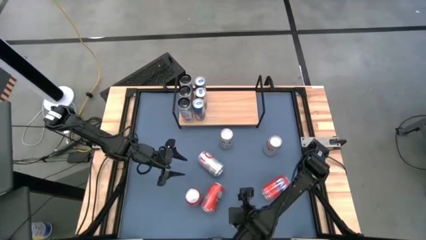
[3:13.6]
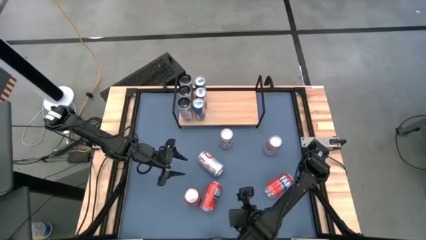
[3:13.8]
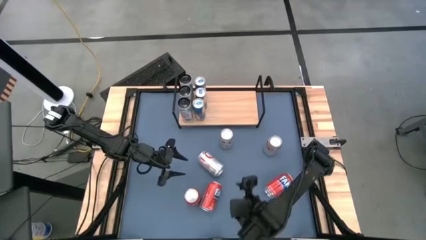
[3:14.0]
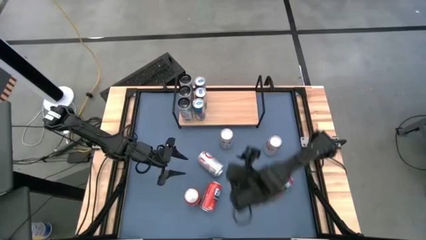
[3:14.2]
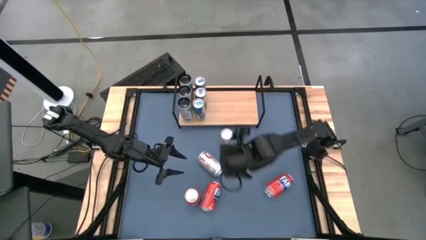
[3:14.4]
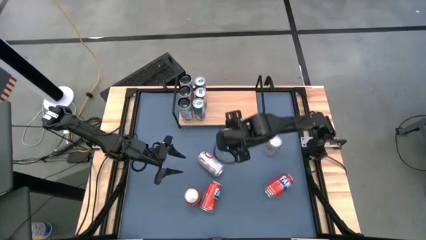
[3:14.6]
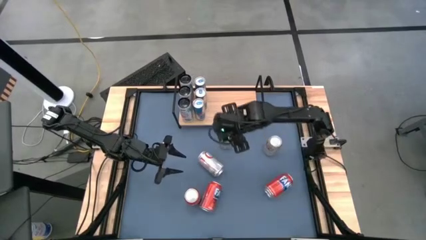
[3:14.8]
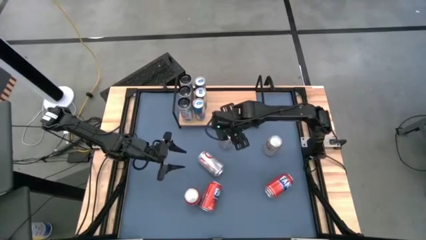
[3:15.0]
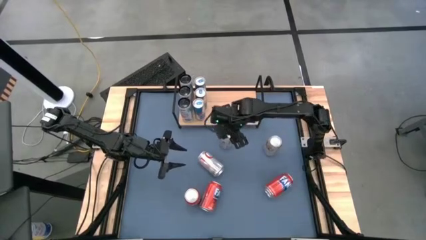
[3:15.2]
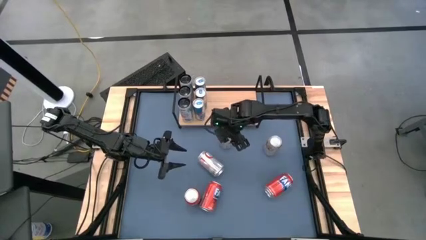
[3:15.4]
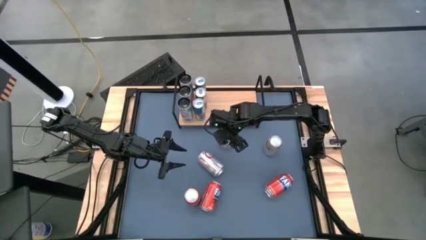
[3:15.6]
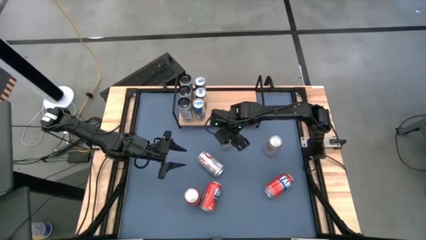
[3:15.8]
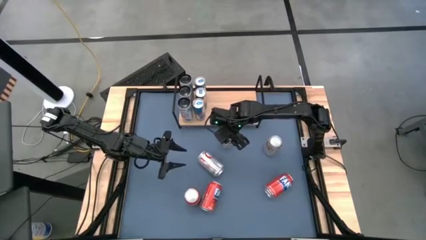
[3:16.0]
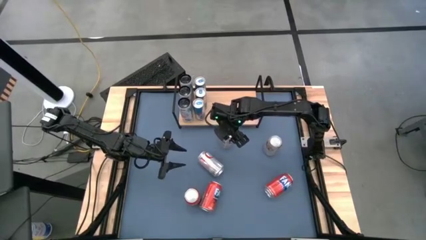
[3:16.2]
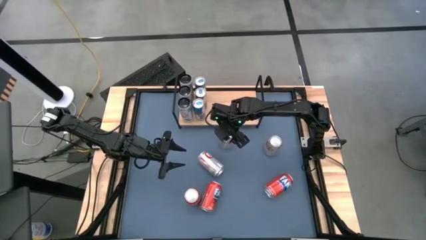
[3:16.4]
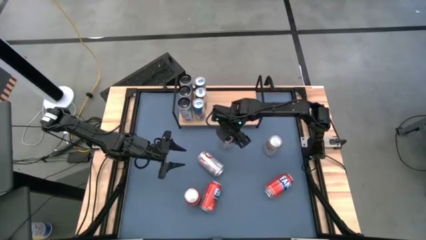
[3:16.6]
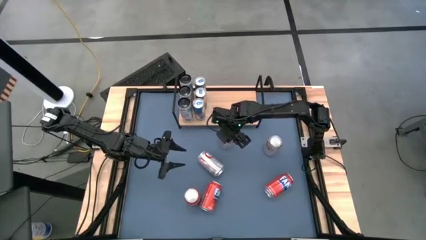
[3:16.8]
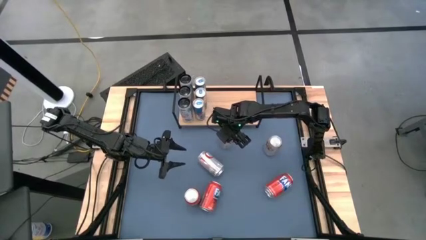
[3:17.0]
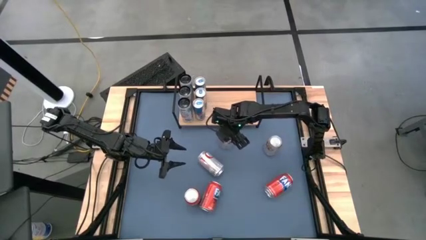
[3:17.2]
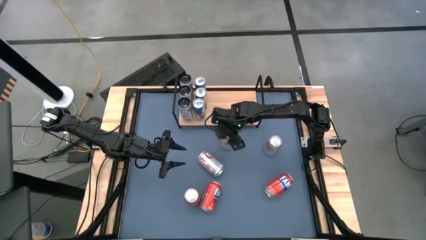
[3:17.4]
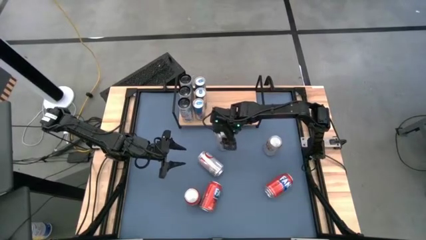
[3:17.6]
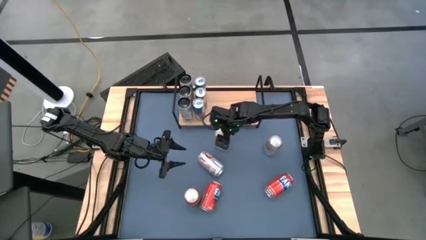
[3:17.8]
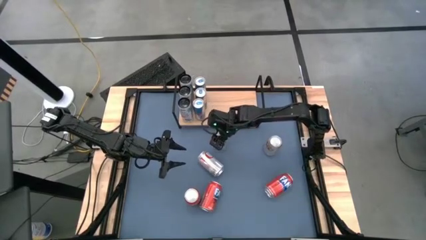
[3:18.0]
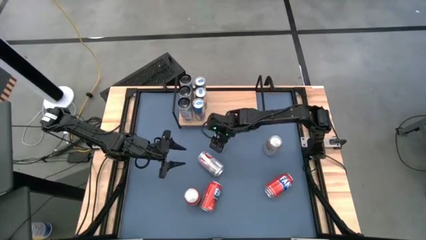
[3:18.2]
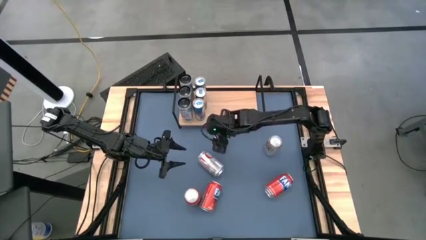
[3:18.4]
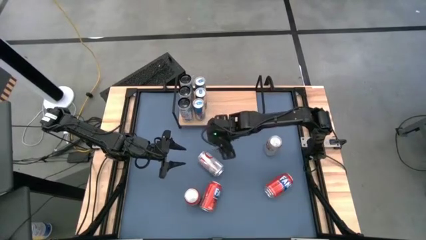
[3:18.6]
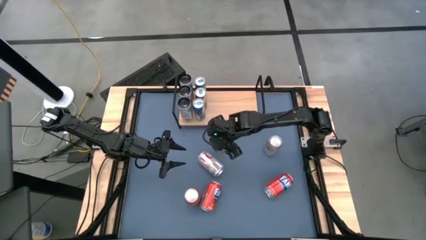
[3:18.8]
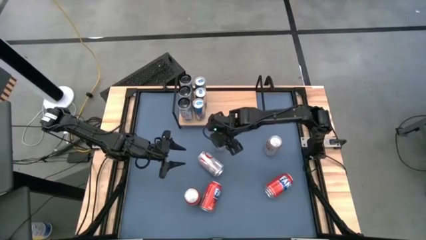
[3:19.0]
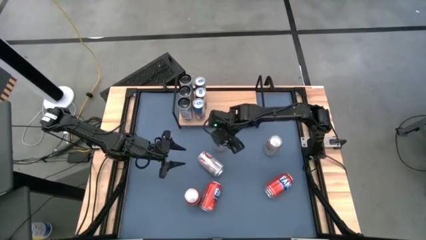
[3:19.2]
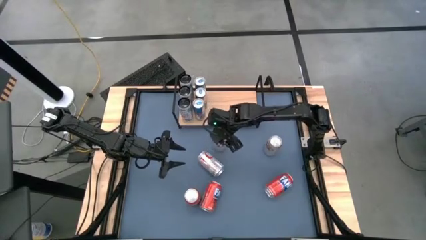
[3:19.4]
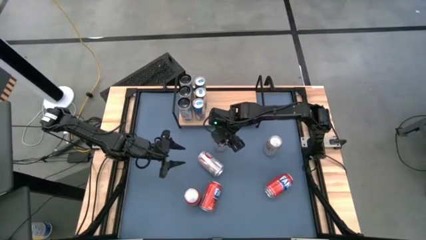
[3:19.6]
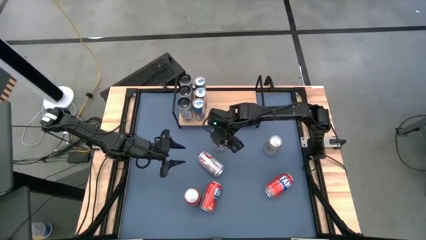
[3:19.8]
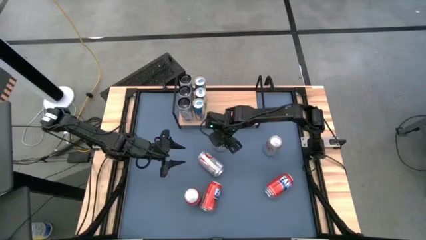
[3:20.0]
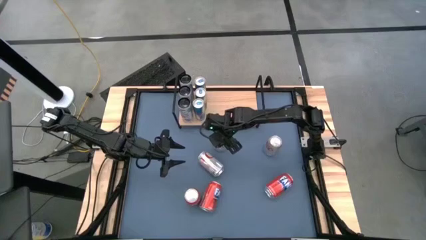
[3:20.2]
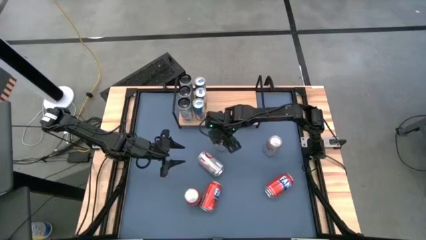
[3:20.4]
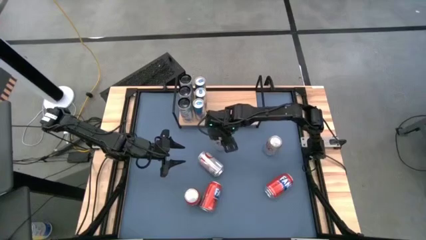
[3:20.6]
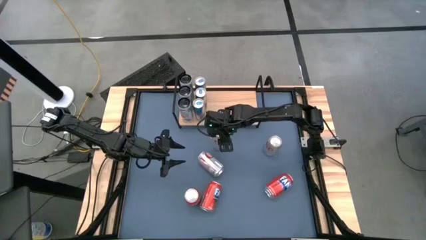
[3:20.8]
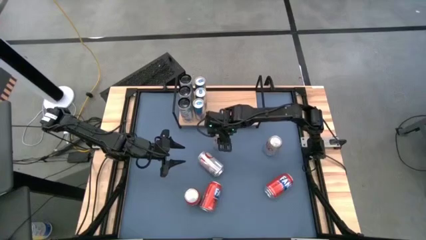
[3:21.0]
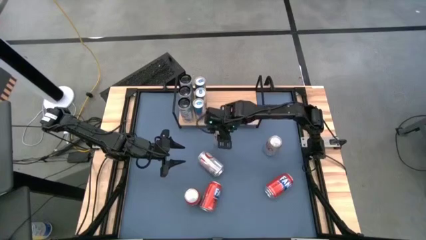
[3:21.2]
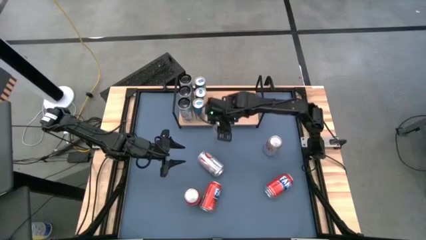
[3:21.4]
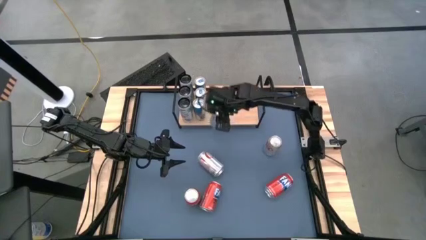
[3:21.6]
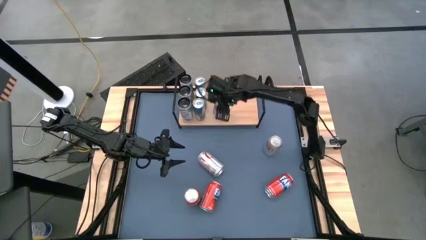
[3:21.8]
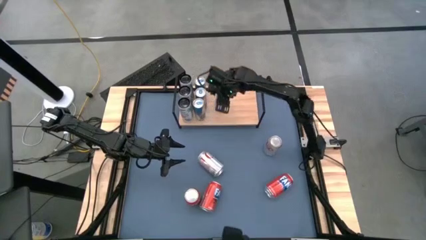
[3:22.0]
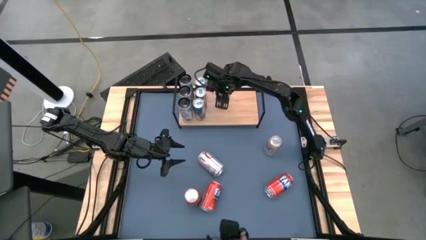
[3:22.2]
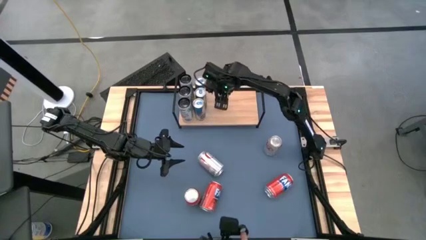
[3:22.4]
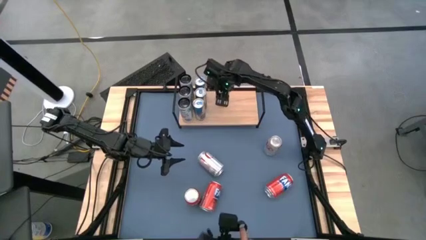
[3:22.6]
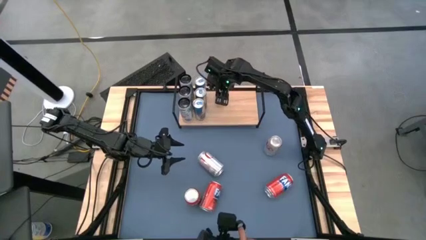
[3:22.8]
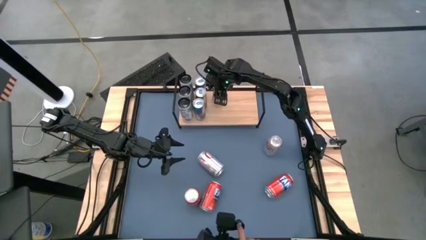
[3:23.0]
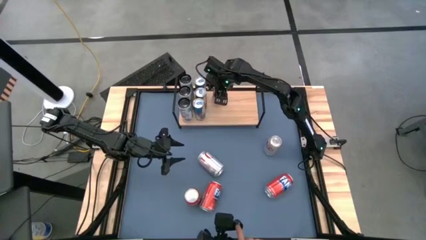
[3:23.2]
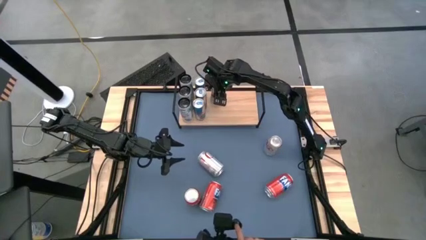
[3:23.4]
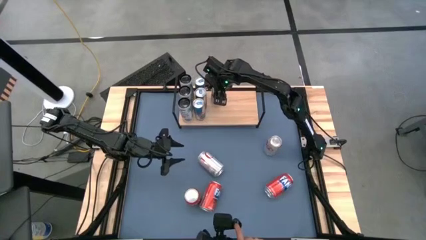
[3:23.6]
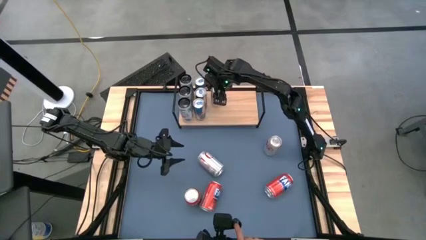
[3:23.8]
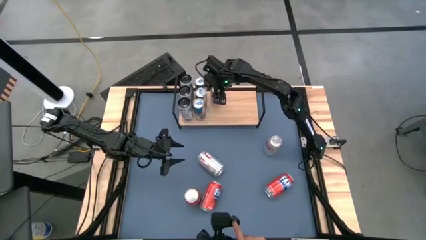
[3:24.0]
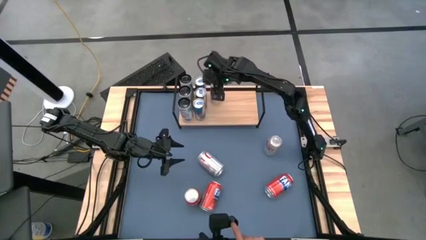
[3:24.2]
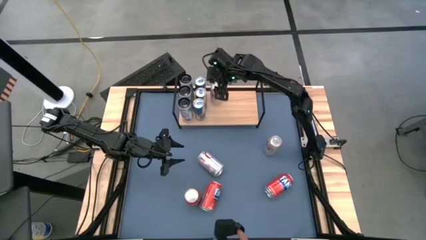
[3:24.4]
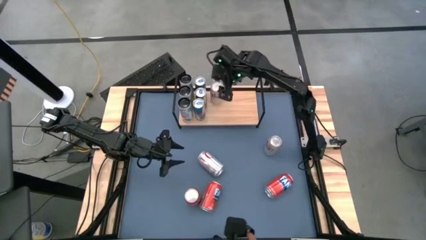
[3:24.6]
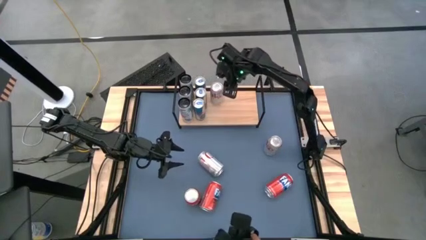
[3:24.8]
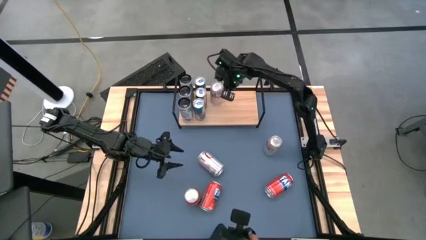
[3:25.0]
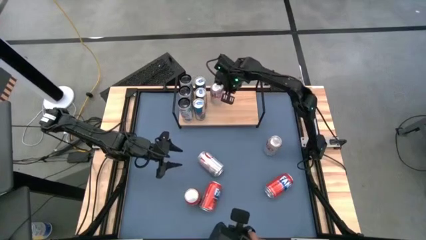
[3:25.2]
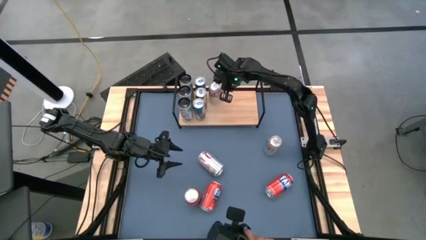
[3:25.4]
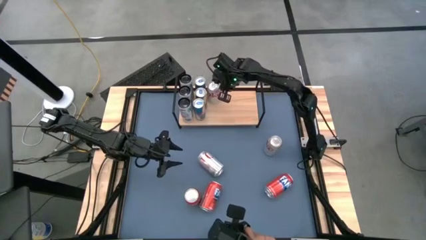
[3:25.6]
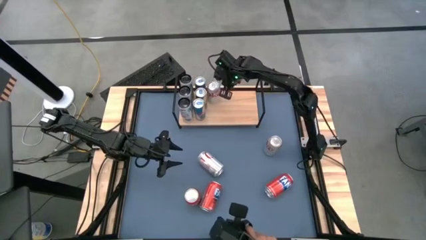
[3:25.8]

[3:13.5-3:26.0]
Task: Place canned beverage on shelf
Put the middle silver soda can on the shelf

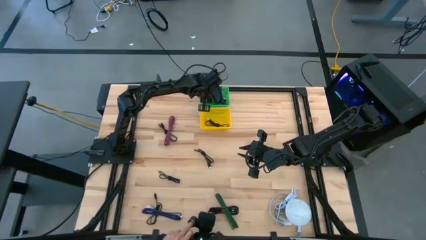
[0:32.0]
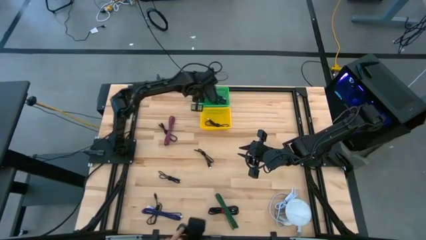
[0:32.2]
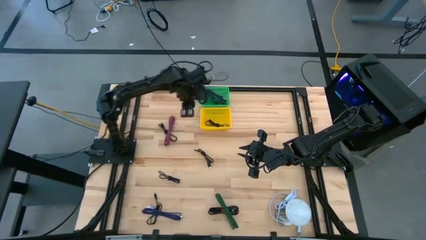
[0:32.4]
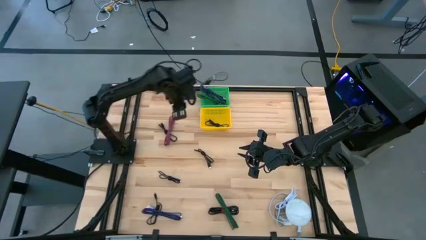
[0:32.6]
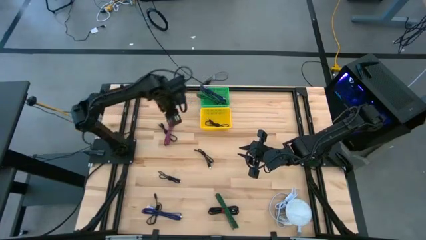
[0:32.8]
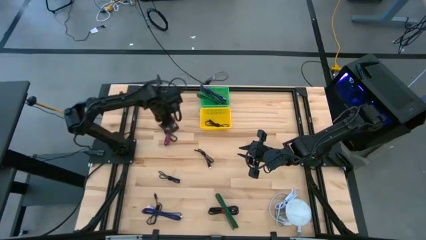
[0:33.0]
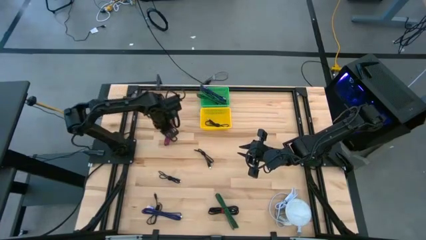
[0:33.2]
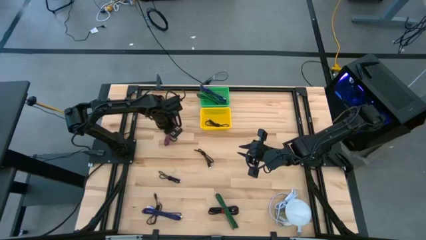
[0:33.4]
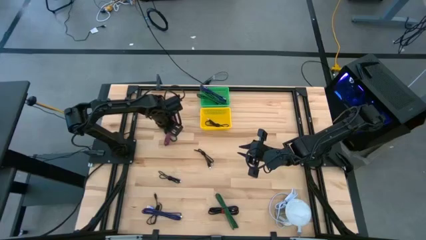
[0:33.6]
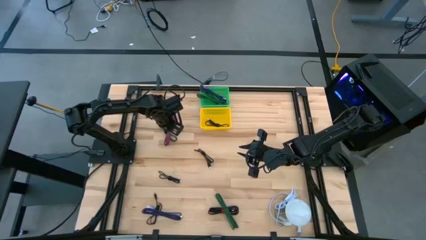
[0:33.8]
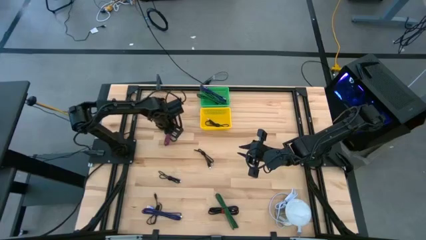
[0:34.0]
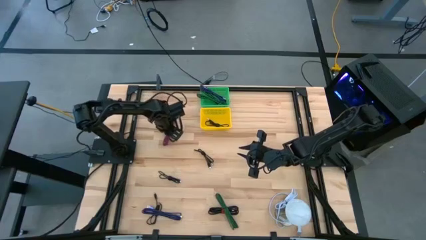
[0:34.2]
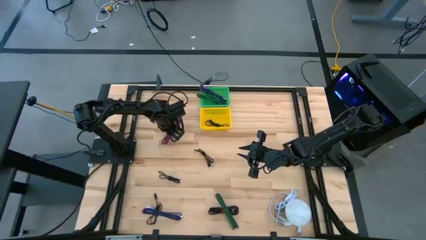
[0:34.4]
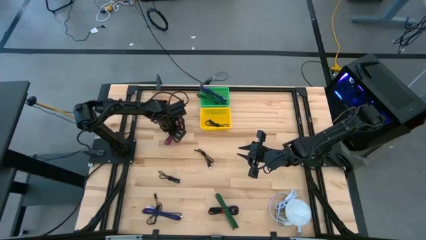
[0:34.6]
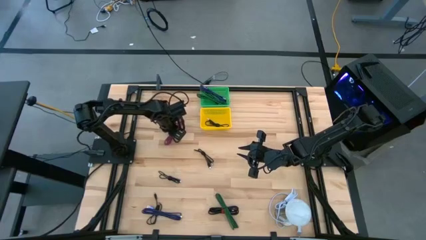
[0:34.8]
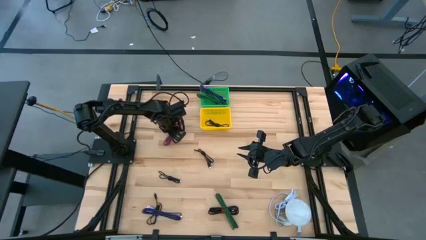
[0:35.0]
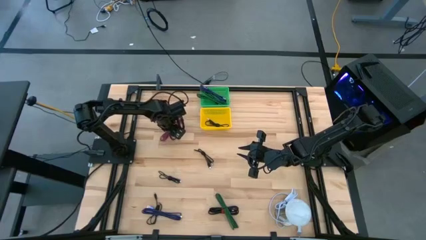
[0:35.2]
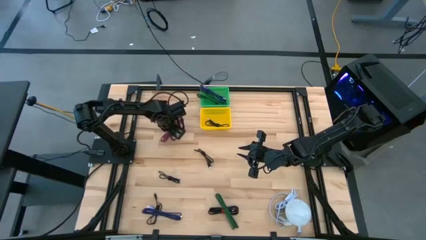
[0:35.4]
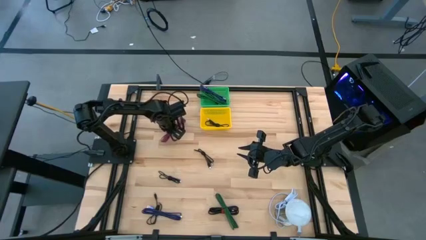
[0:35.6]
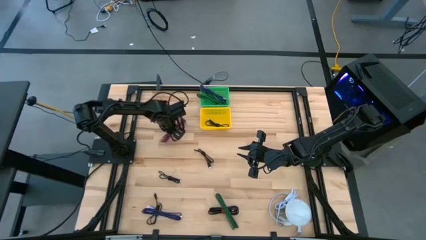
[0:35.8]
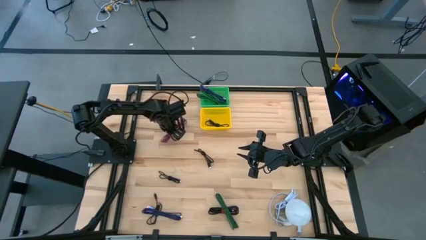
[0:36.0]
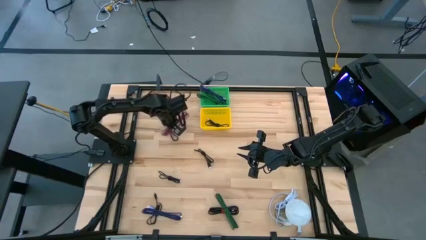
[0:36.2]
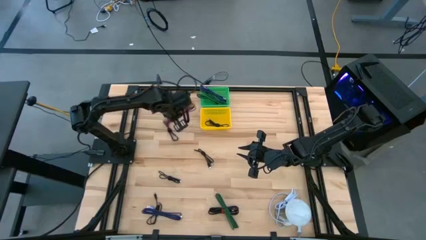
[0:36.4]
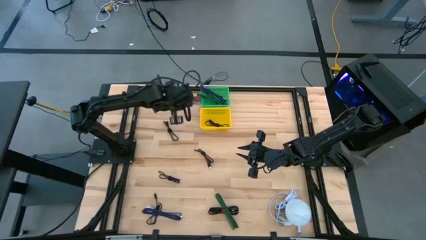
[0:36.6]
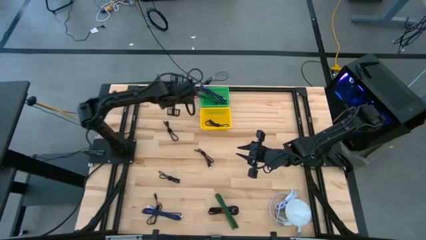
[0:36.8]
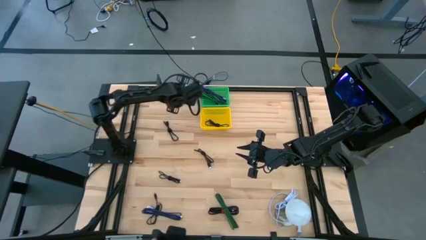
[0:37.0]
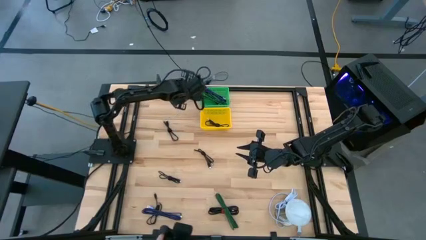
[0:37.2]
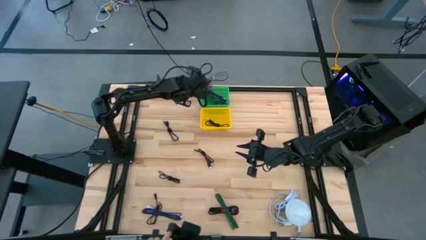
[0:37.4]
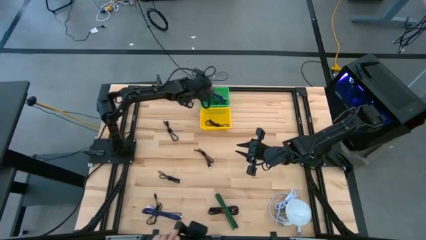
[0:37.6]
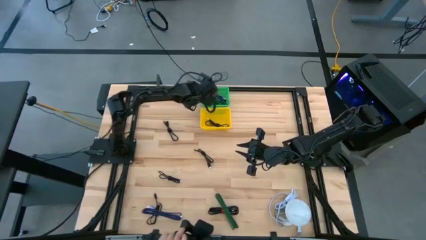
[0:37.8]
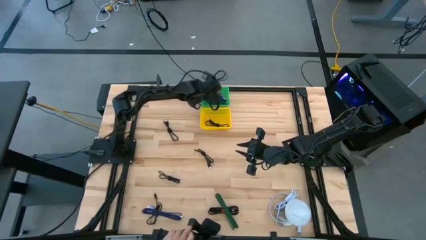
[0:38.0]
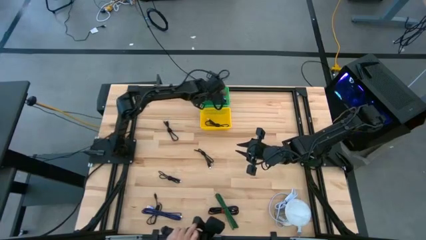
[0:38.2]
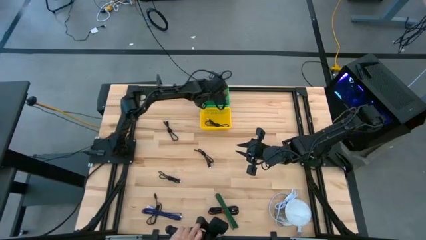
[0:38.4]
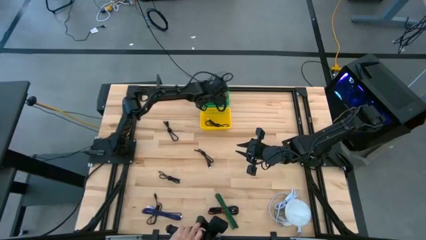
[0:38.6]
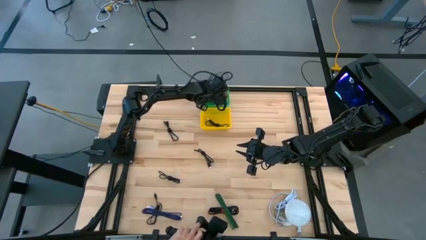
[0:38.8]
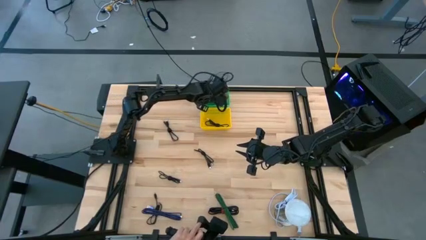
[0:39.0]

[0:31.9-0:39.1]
Task: Pick & Place USB Port
Put the left pink patterned charger cable into the green basket
